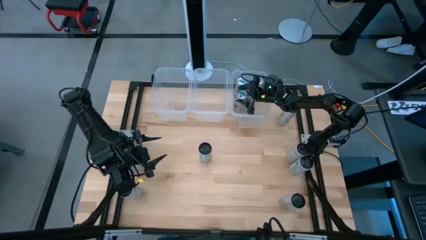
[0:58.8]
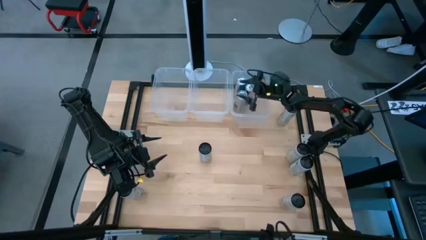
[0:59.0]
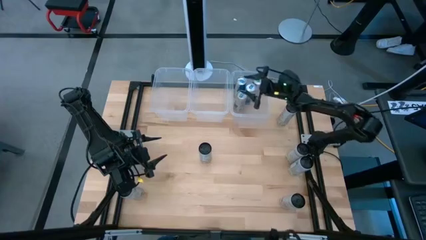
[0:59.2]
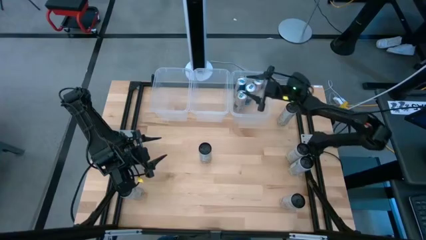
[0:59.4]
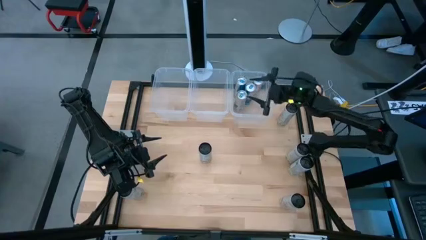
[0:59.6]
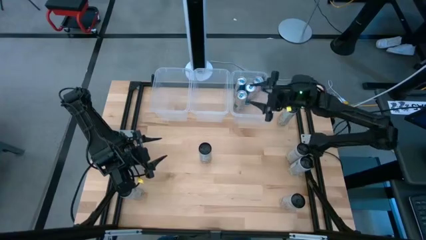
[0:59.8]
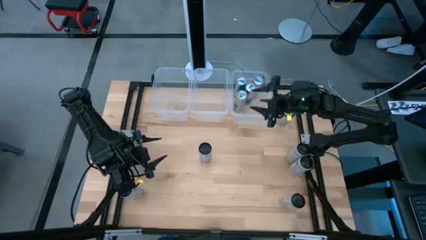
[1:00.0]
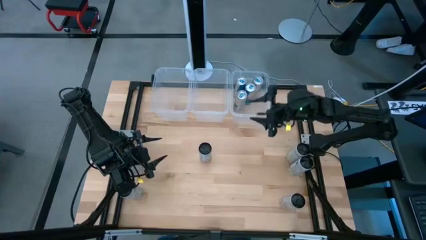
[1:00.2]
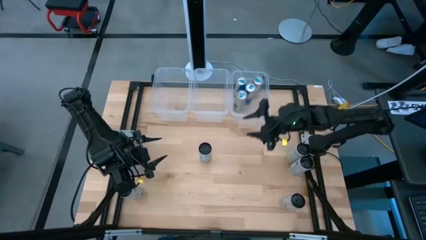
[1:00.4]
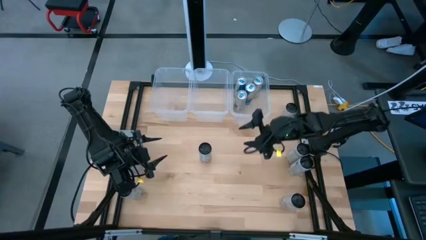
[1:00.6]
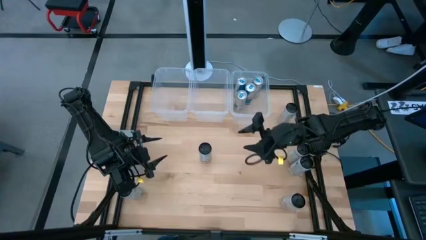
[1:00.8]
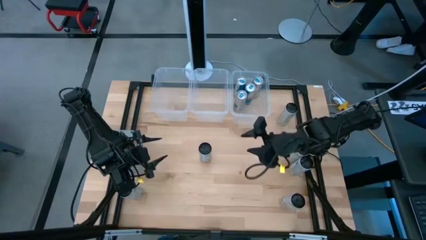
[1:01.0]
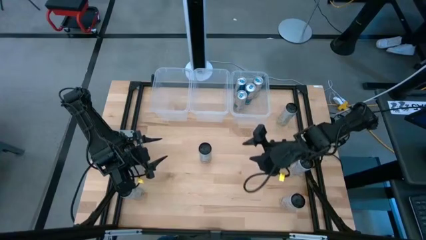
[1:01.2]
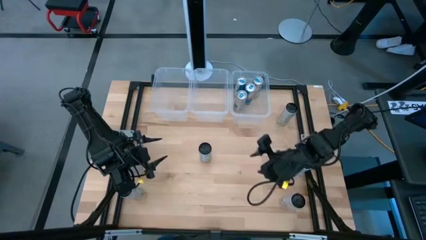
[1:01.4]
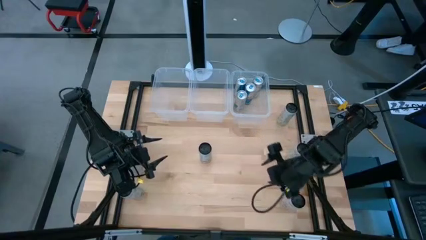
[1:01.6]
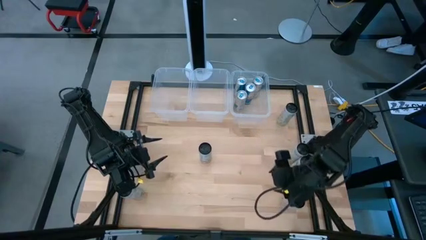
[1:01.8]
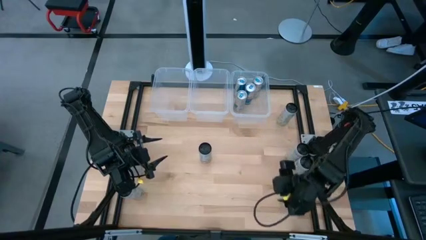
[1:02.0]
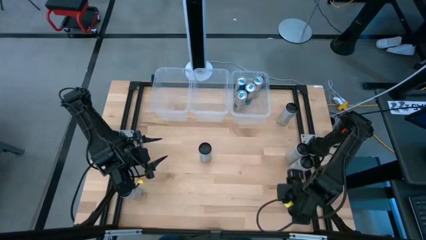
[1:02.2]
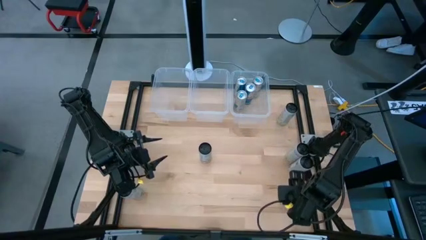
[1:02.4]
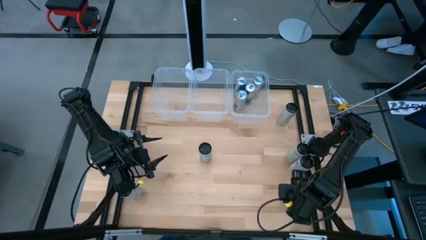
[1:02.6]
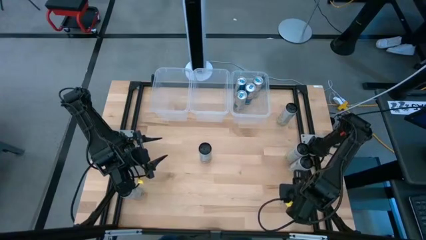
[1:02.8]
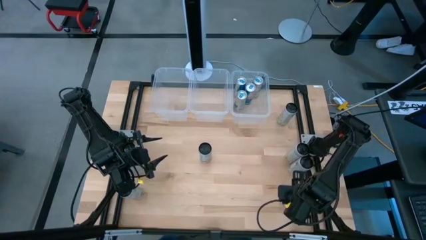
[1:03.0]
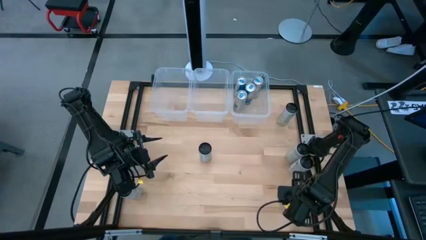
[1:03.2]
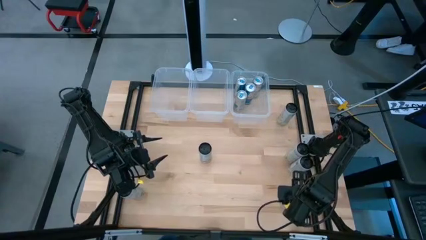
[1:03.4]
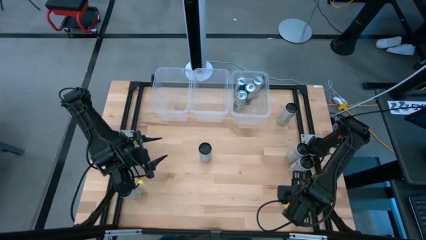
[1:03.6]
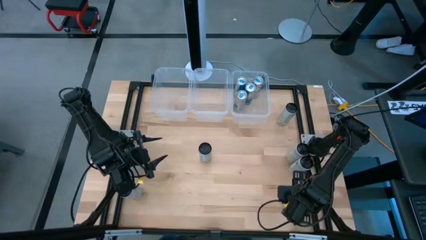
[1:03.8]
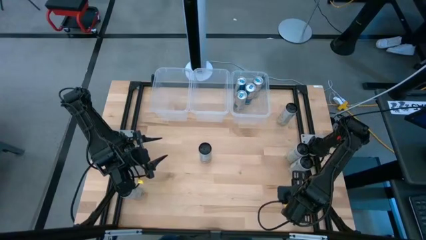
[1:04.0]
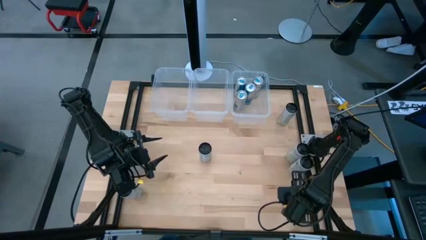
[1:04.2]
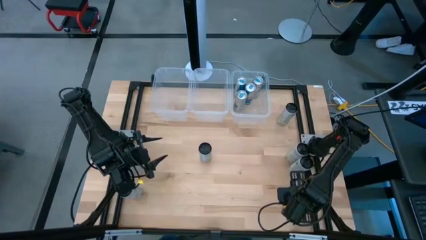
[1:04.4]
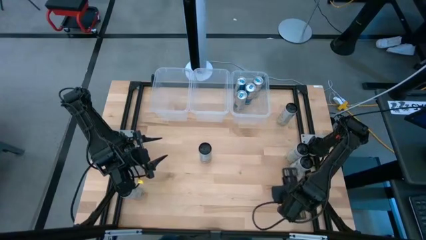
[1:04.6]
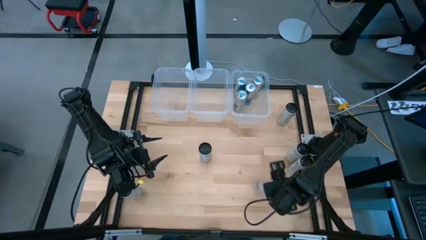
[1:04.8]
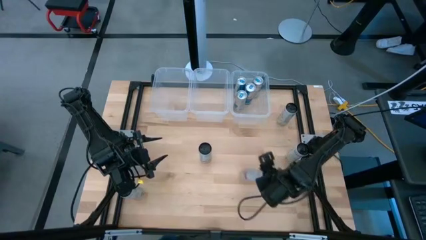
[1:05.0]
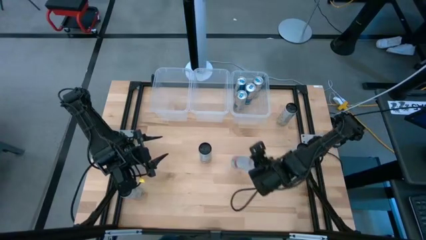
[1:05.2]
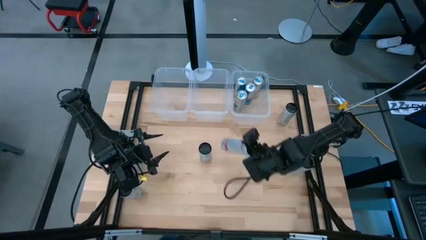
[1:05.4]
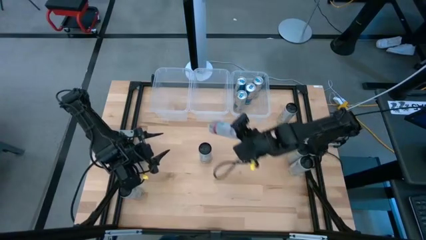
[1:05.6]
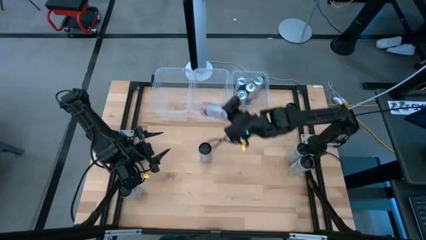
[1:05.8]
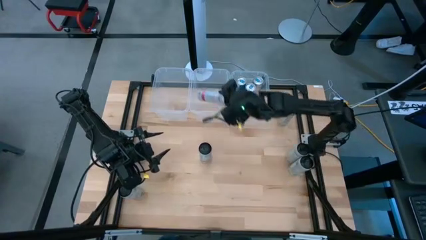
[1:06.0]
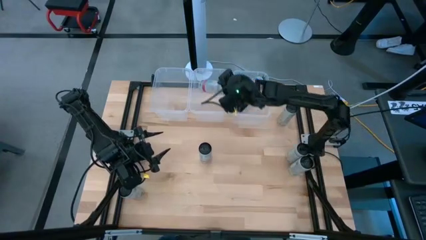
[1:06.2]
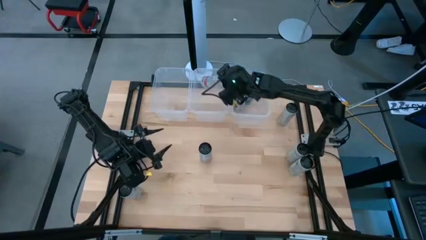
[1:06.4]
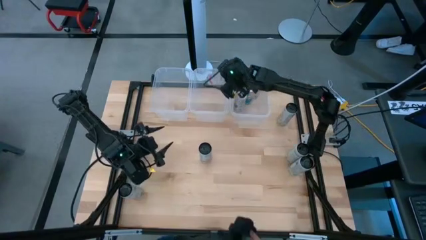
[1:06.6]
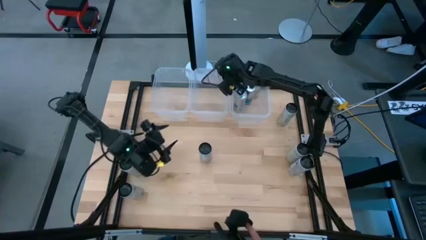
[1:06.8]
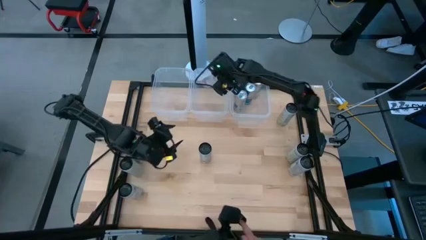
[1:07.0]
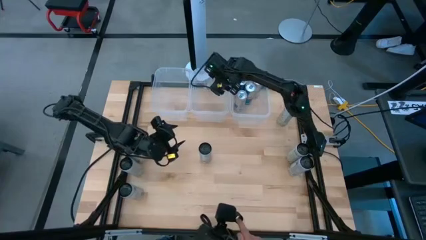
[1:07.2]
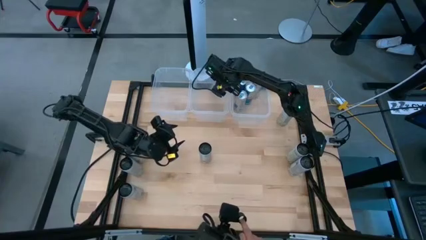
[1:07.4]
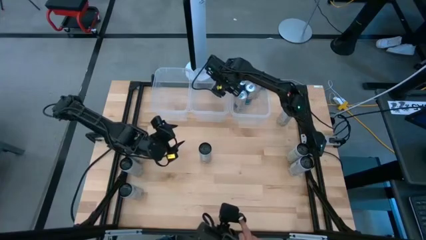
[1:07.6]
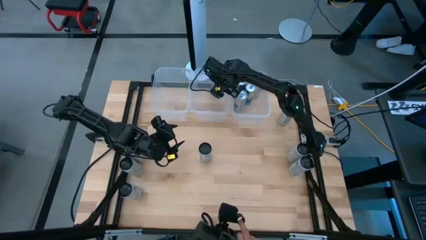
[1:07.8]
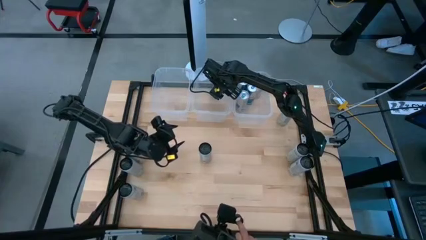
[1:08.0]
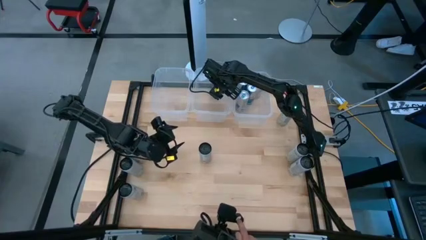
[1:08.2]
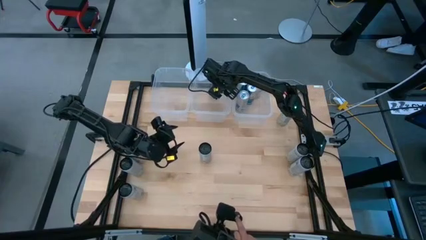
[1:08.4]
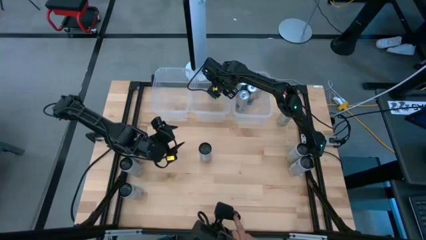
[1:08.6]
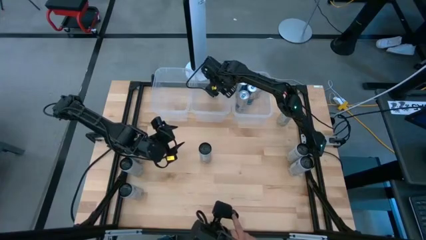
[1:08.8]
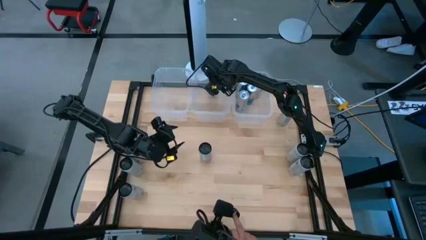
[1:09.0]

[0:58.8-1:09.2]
Task: Sort soda cans
Put the white-pink soda can into the middle transparent bin

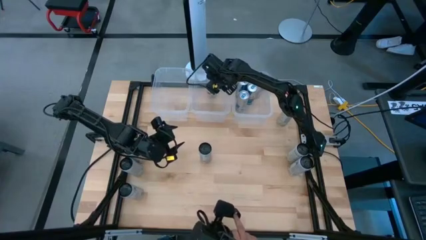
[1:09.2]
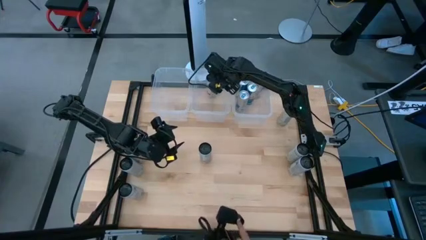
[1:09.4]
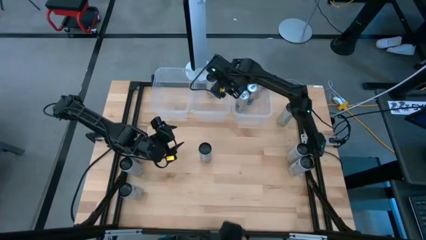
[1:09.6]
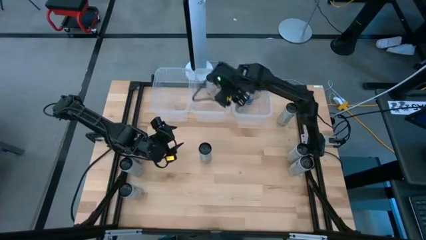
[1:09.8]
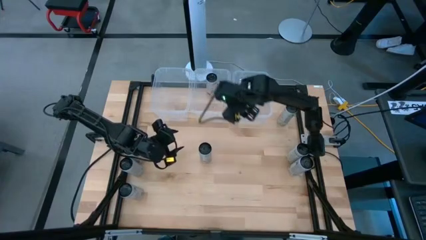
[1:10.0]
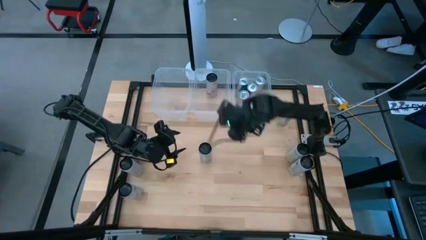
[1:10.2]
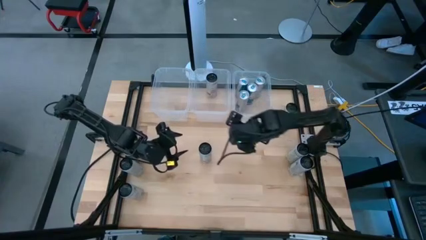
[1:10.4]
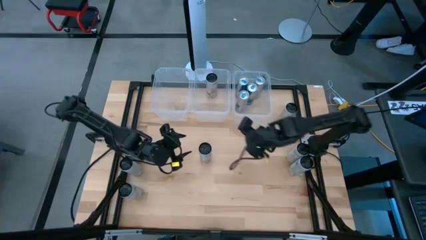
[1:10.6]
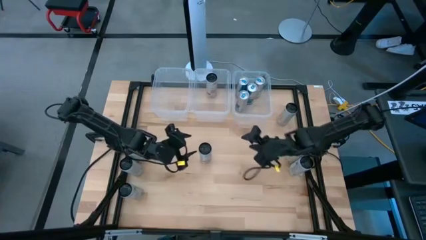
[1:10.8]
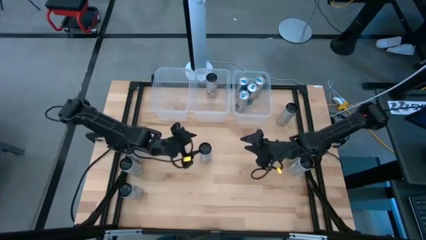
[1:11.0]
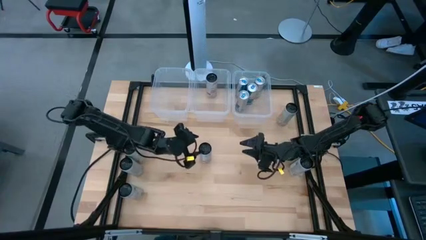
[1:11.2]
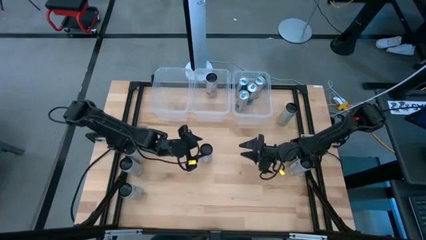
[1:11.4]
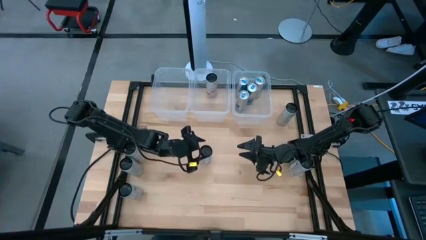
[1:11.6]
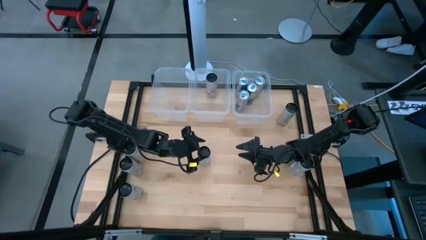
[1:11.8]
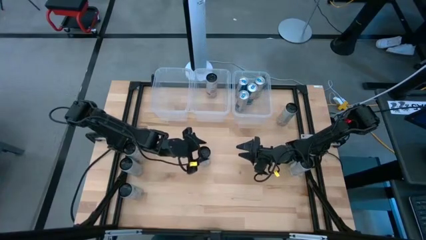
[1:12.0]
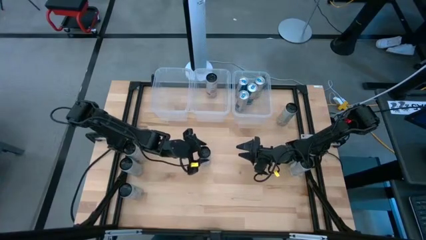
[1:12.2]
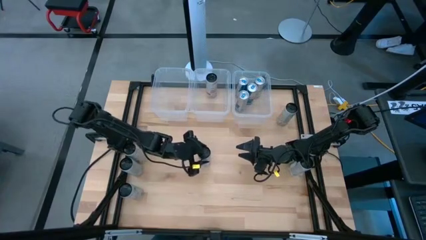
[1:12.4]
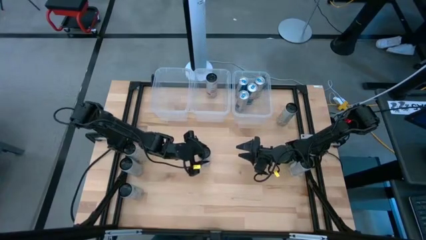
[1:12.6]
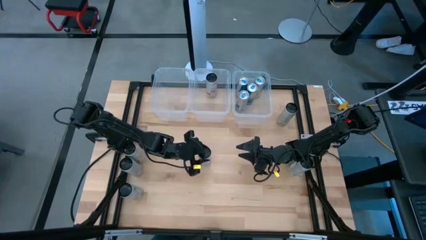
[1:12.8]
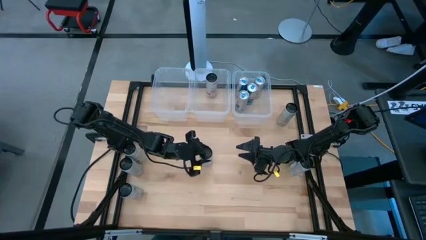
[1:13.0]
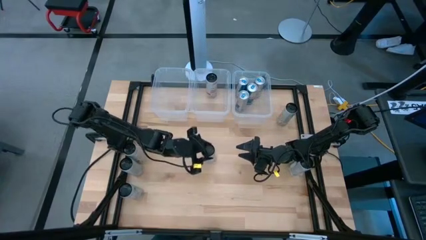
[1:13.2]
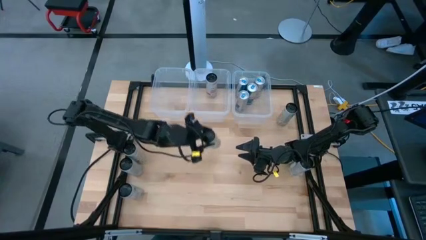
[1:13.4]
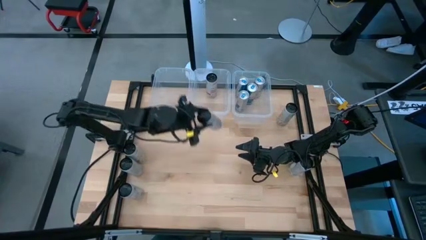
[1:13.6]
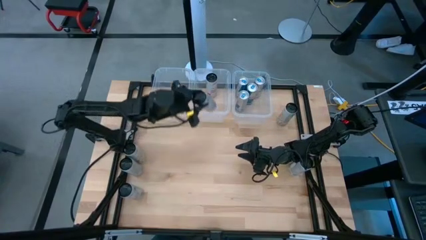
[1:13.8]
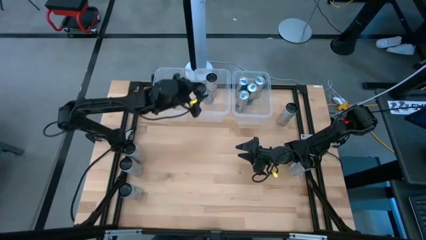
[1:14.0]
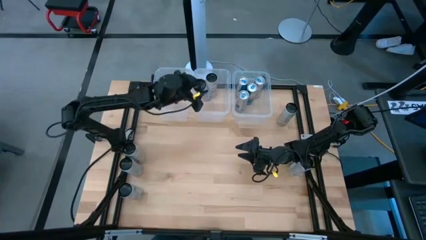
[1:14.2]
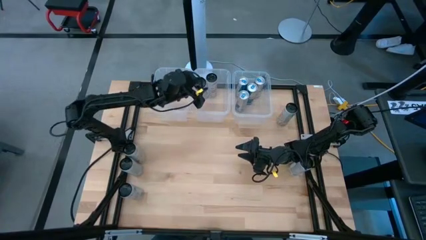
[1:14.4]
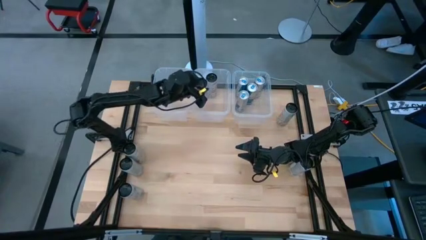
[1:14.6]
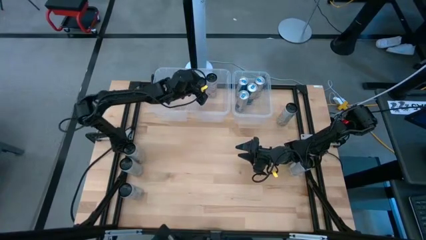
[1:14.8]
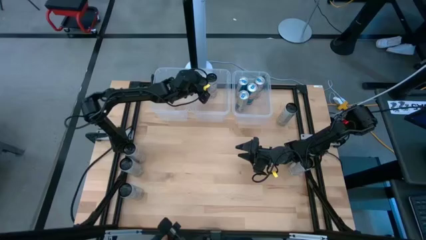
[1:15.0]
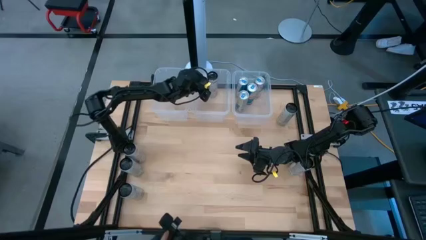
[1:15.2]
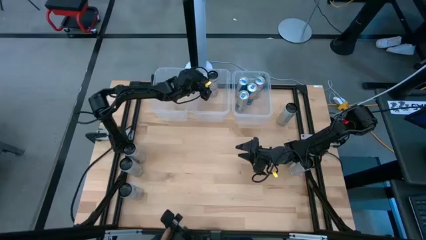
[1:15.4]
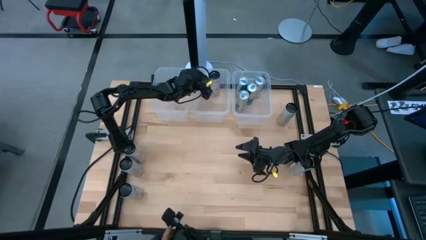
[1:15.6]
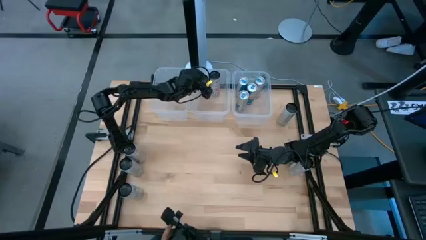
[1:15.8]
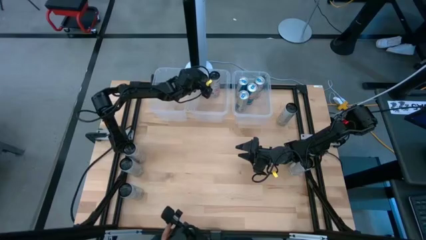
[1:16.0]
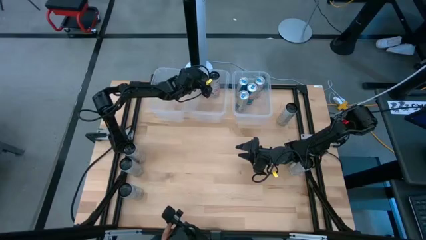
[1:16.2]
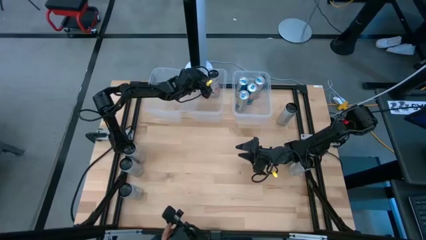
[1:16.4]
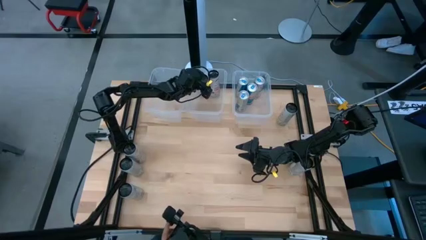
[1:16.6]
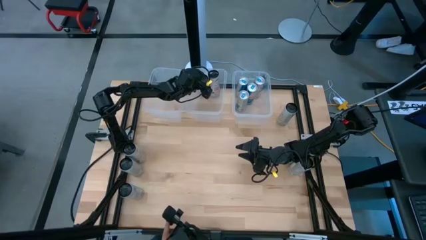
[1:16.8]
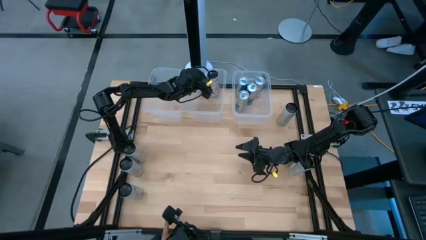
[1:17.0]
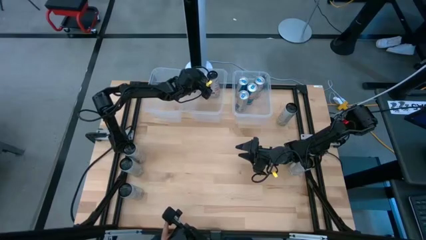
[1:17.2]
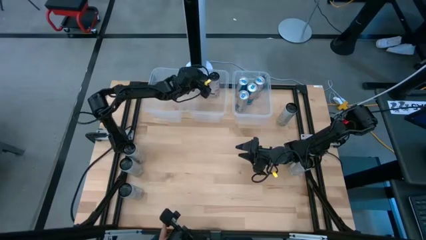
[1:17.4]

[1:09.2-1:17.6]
Put the white-pink soda can into the middle transparent bin
